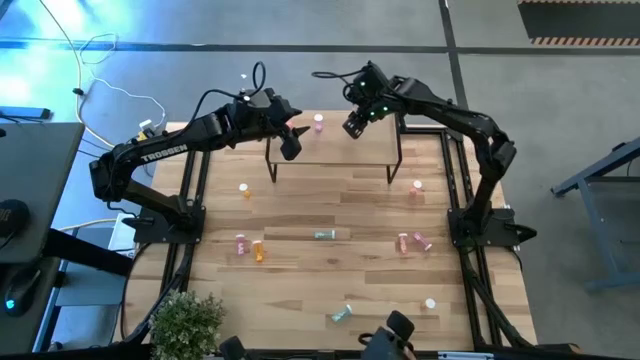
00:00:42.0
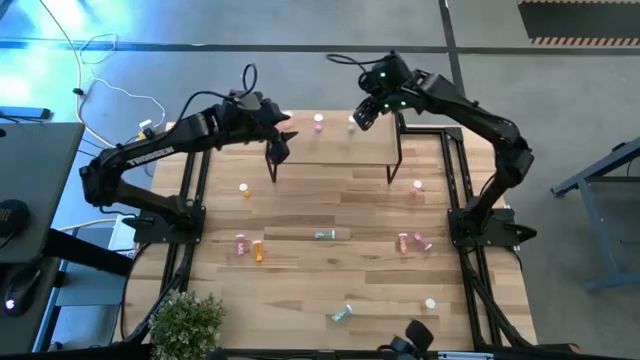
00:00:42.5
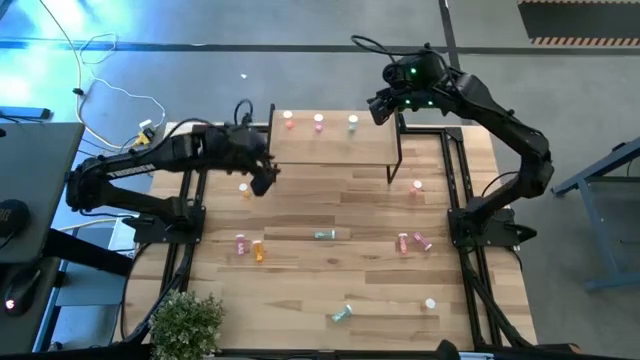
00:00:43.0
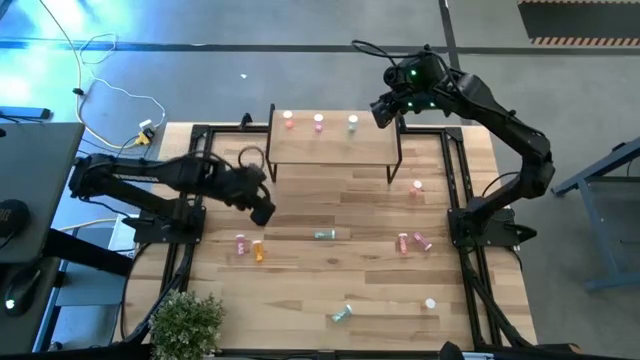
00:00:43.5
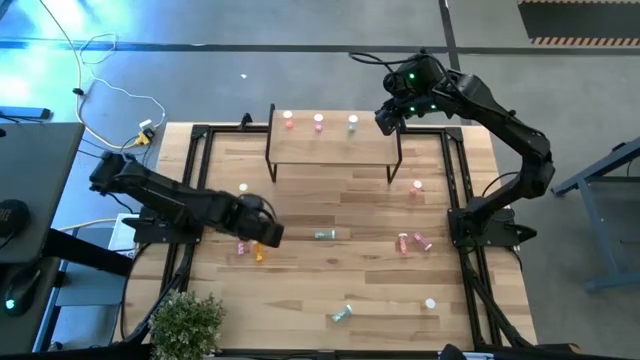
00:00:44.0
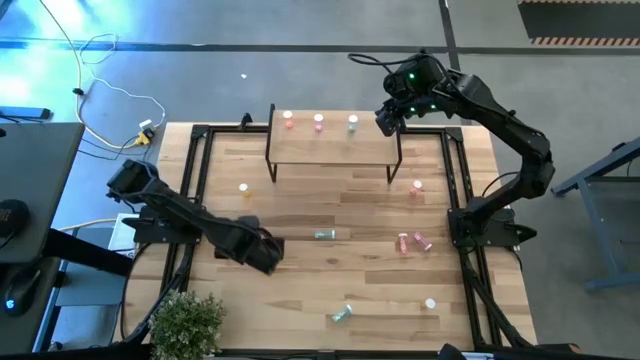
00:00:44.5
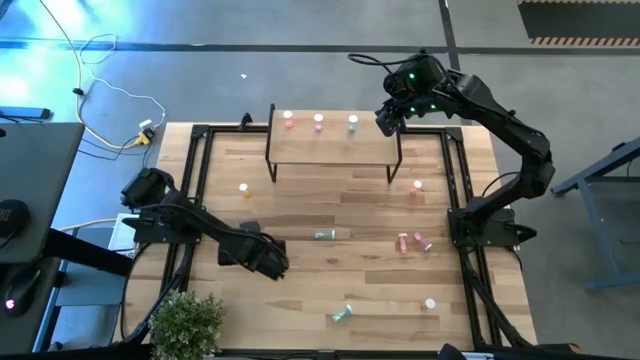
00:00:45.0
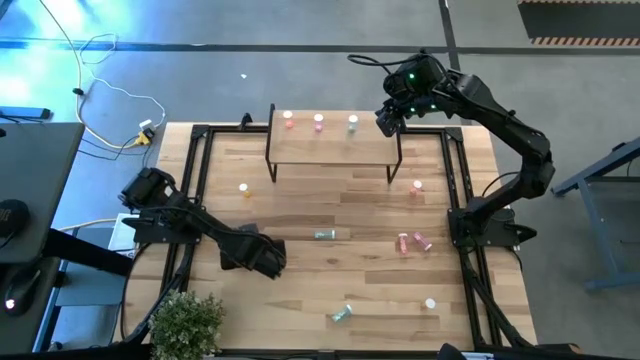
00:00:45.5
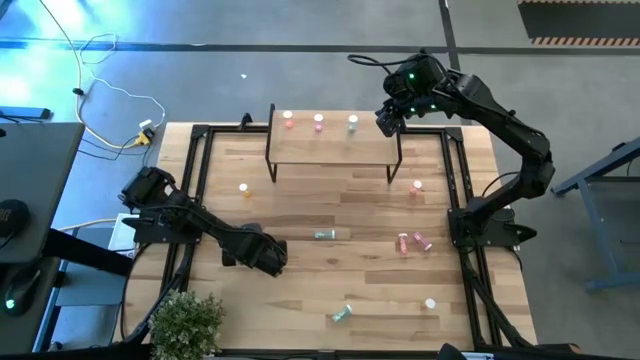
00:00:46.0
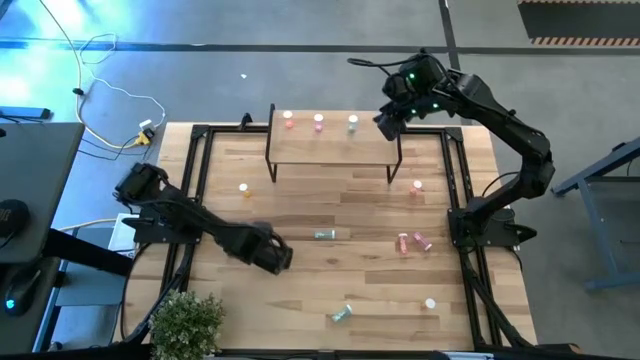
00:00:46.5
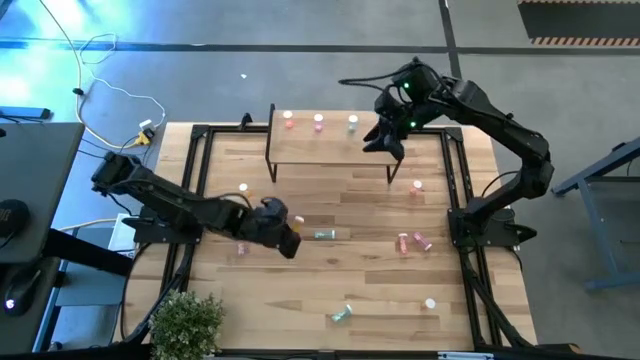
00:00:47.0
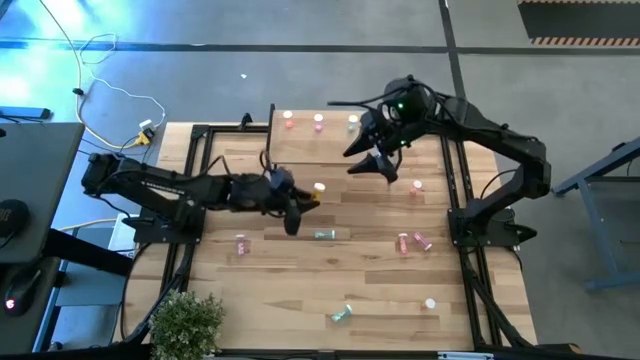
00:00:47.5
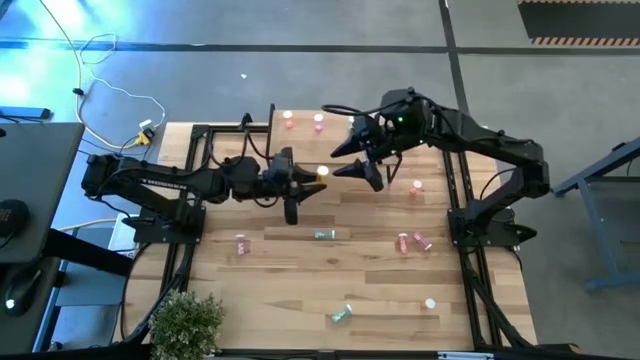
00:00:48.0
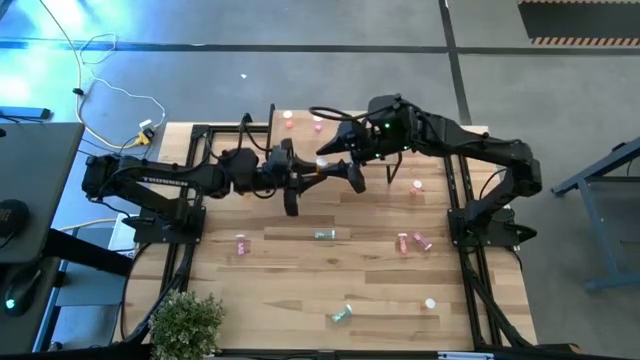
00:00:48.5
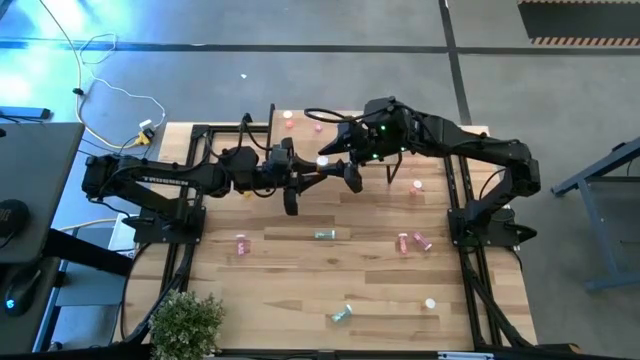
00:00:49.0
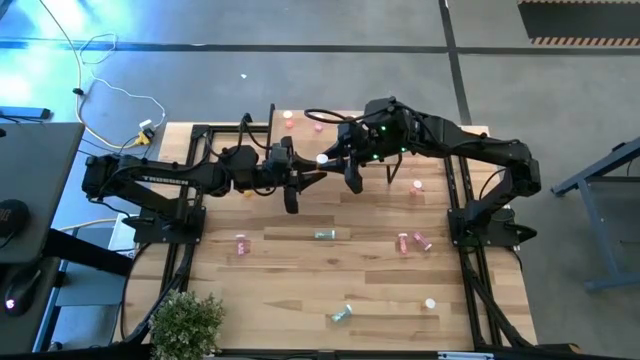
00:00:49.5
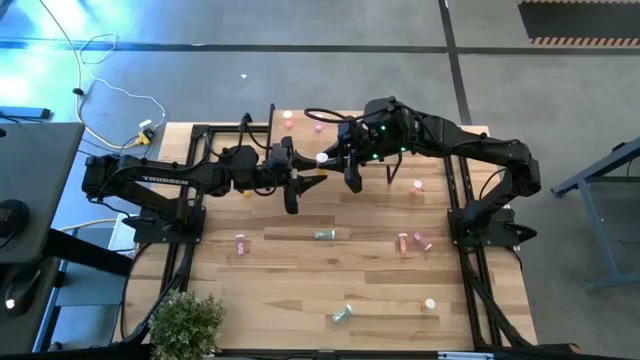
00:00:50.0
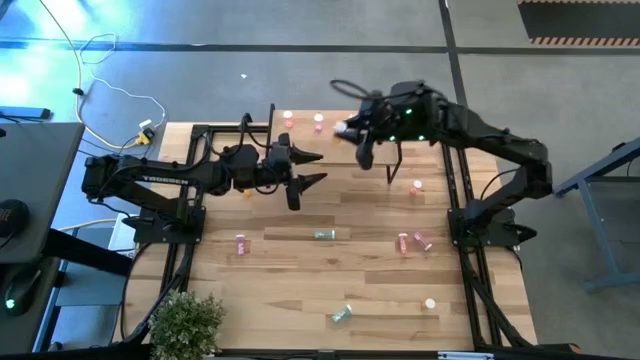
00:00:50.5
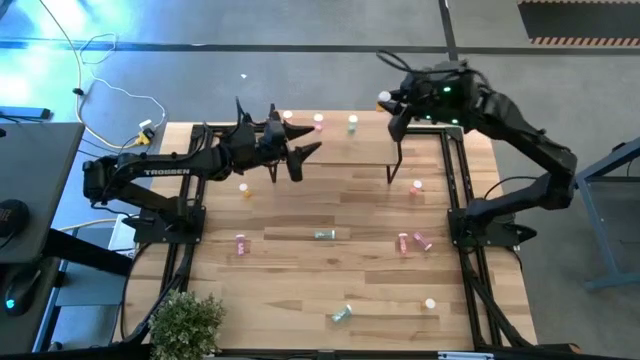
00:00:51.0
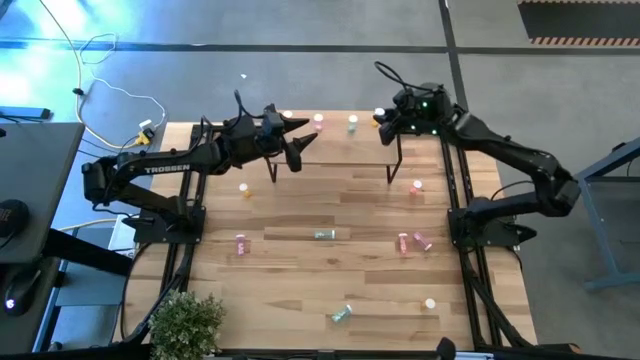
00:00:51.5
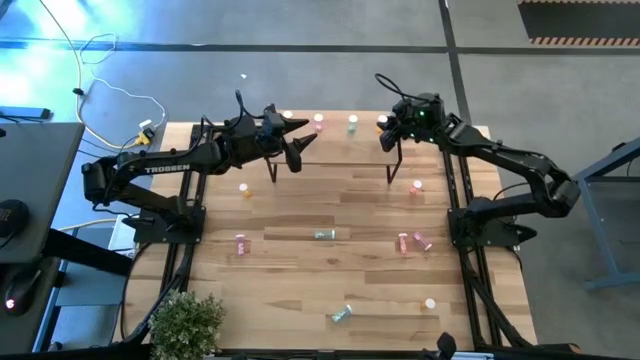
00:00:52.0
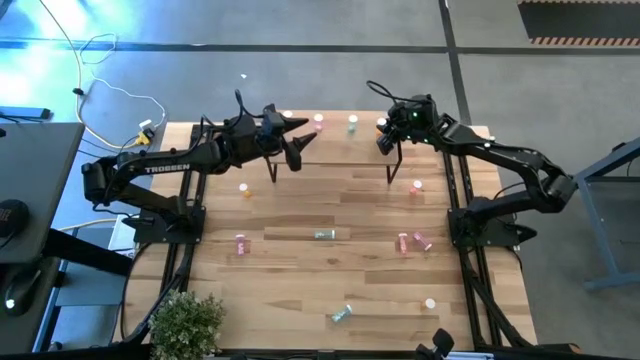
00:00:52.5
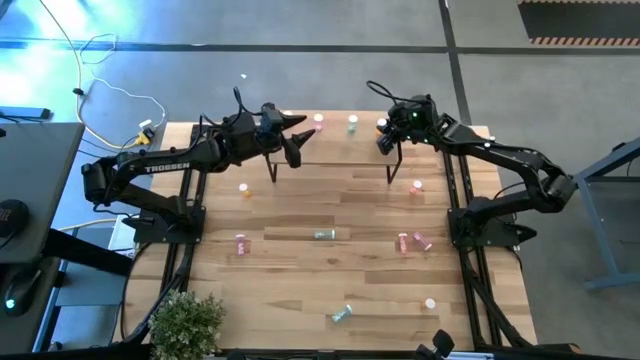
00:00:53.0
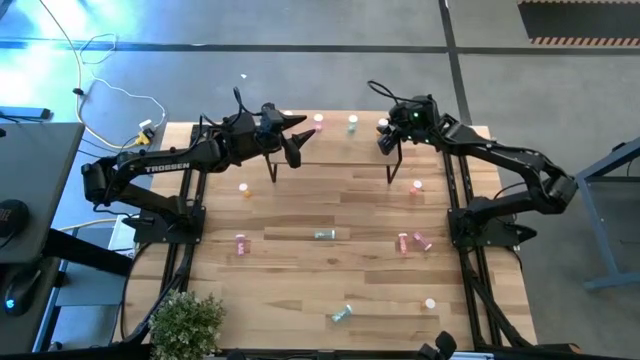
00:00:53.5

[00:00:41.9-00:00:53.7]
Task: Pick and place medicine bottles onto shelf by color
Put the middle orange pill bottle on the shelf

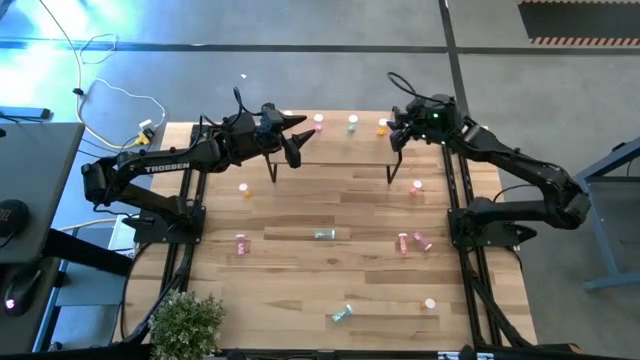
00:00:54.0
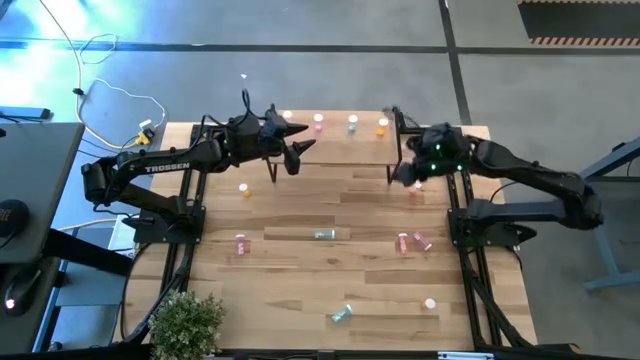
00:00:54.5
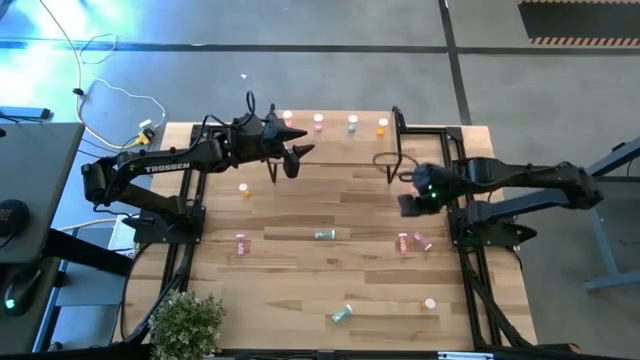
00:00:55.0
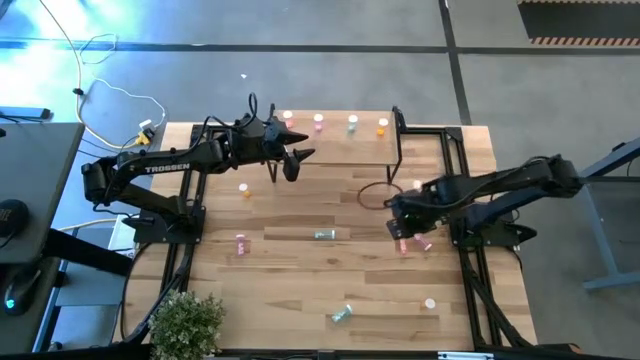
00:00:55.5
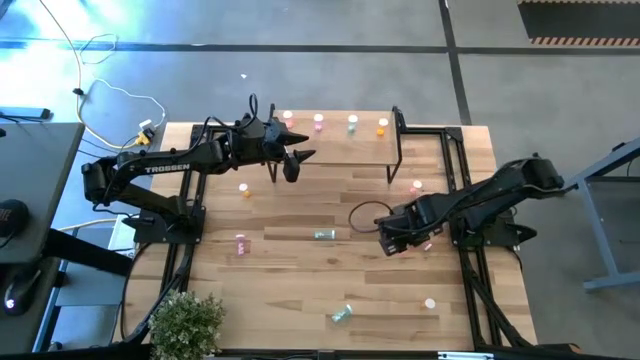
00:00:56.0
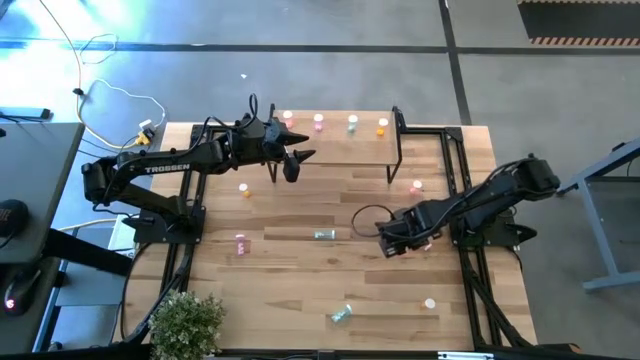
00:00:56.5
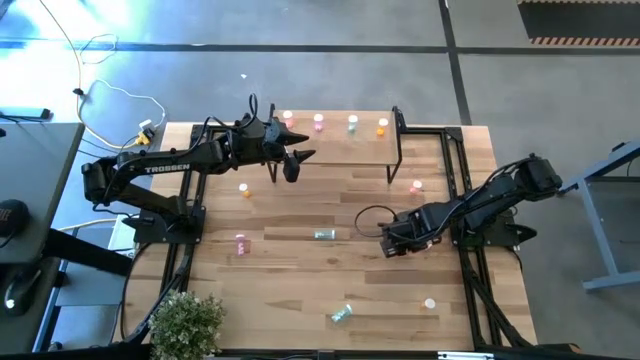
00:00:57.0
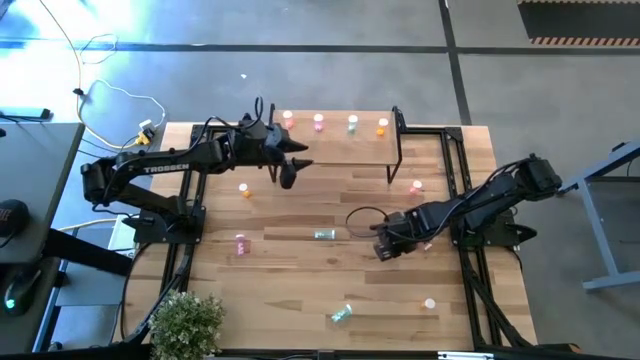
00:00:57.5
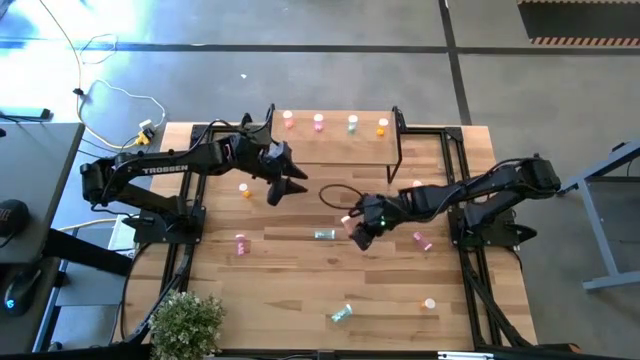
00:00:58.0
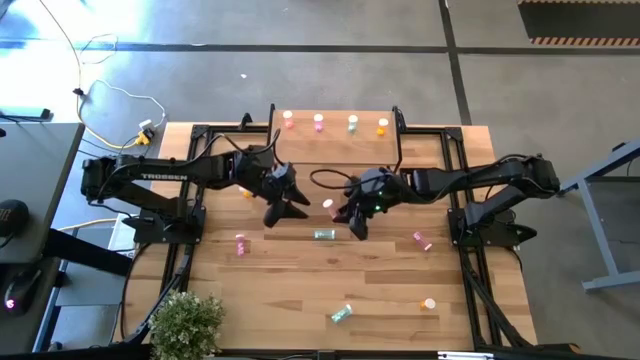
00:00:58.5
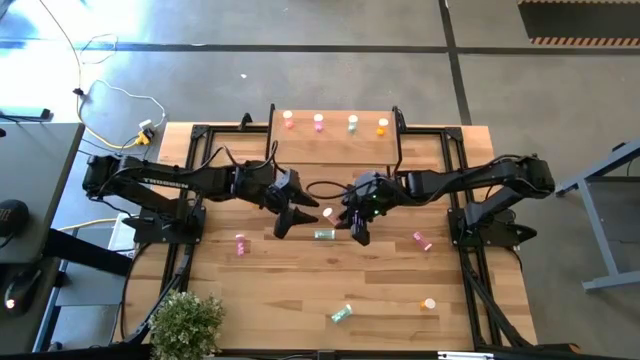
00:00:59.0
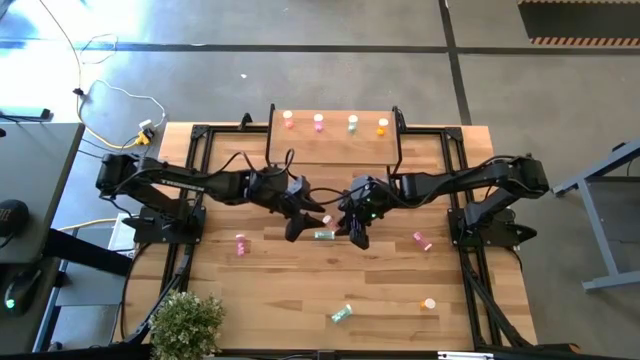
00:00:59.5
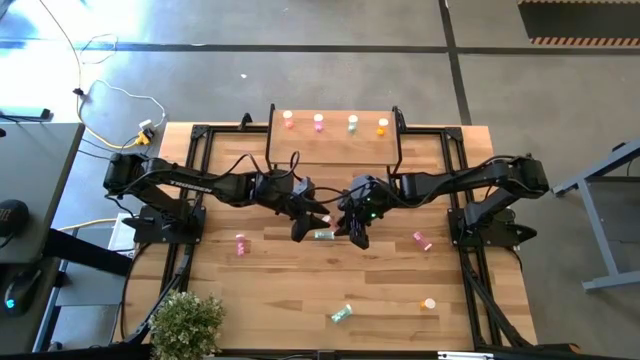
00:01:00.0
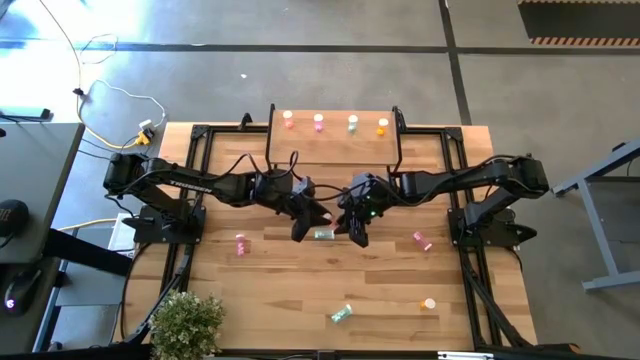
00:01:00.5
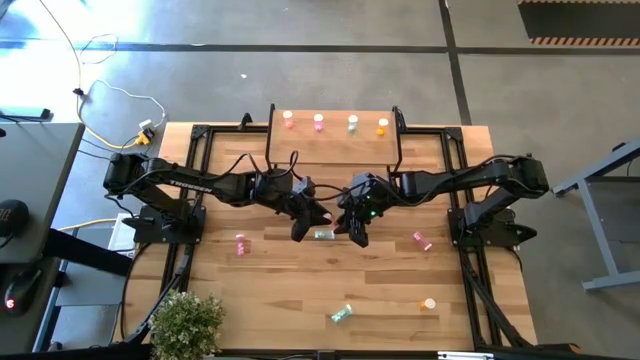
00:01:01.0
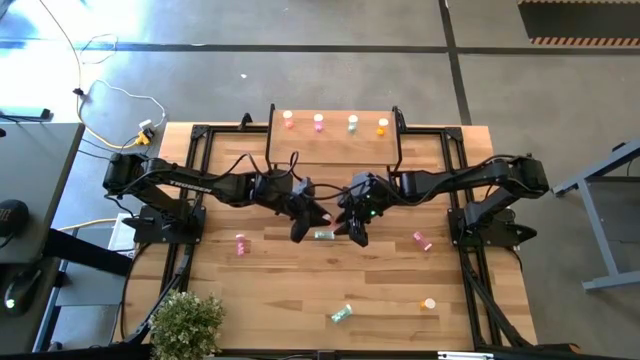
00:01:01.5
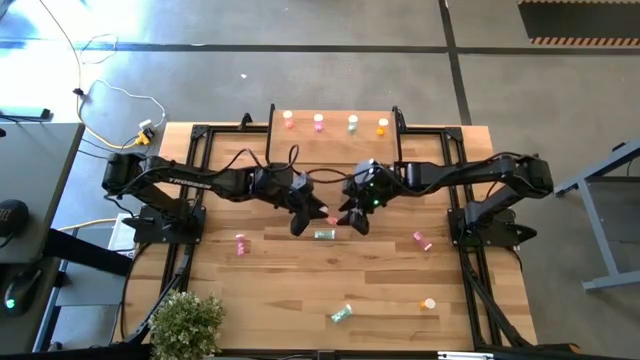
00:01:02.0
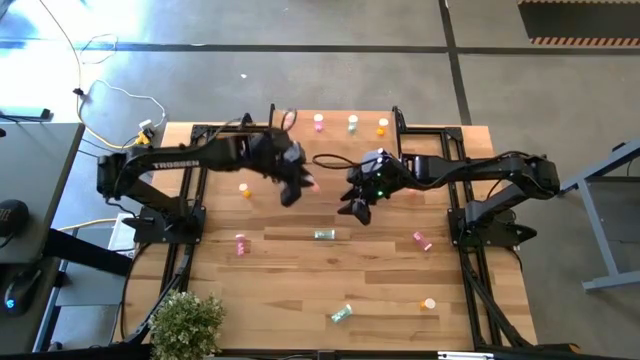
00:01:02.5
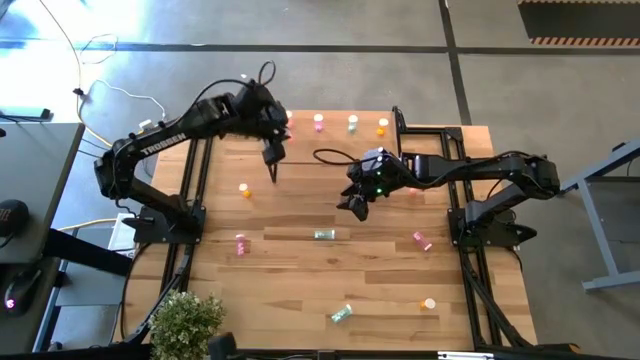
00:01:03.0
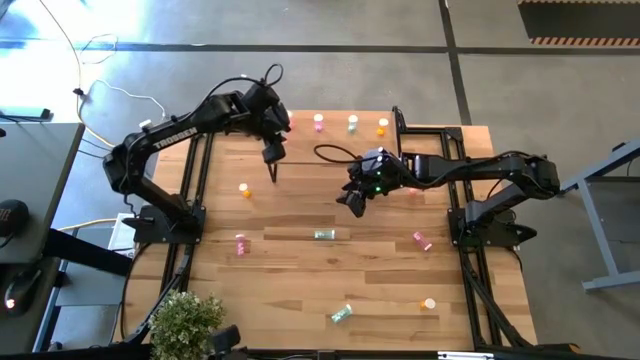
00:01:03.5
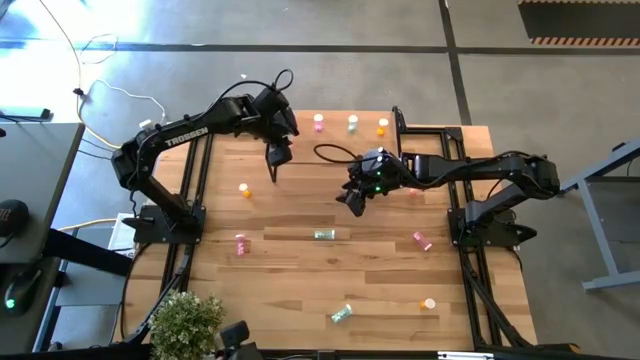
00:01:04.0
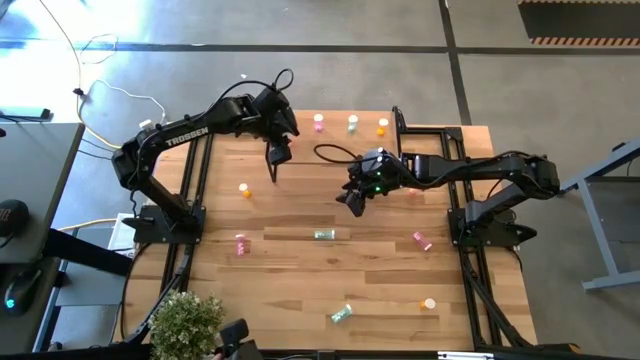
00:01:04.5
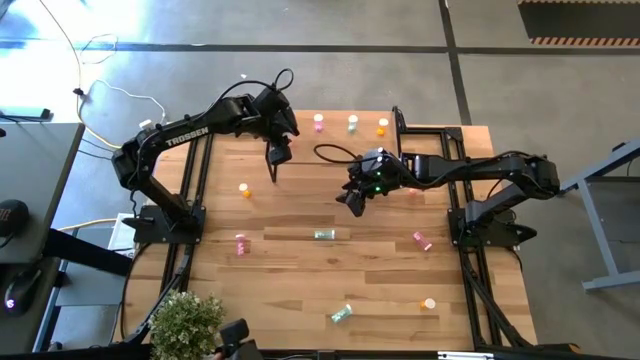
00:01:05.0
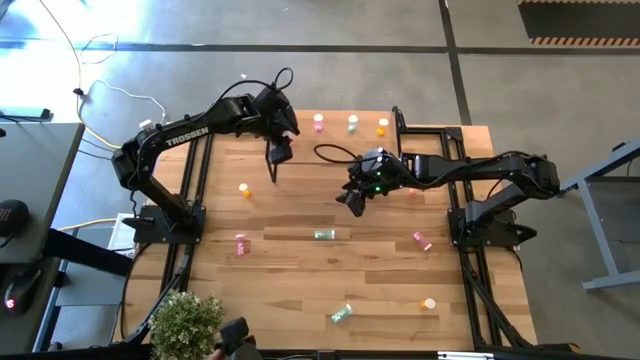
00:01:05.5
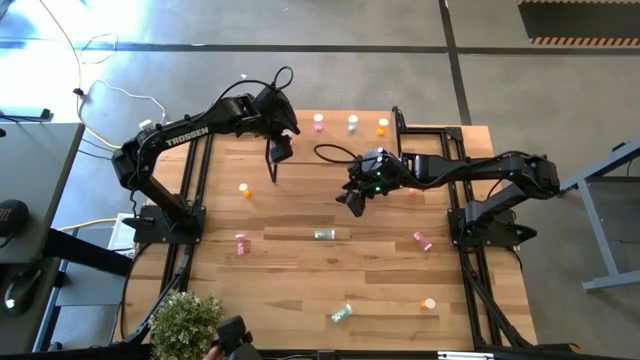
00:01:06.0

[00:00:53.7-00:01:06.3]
Put the bottom pink pill bottle aligned with the pink pill bottle on the shelf
